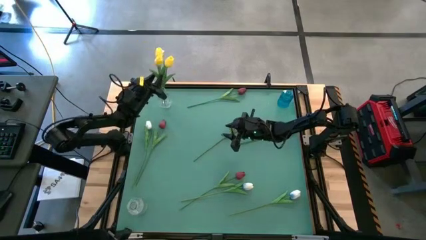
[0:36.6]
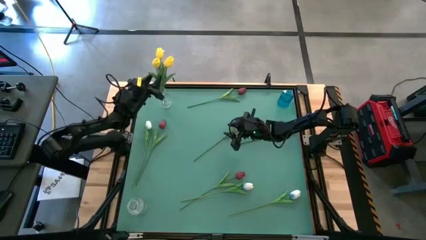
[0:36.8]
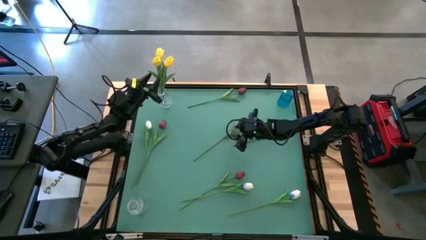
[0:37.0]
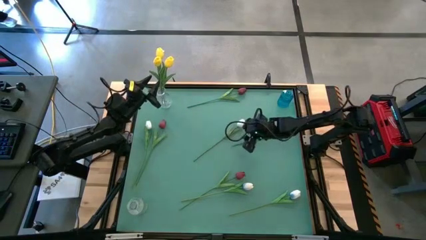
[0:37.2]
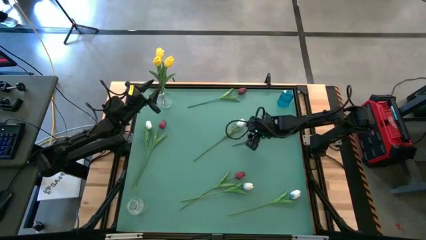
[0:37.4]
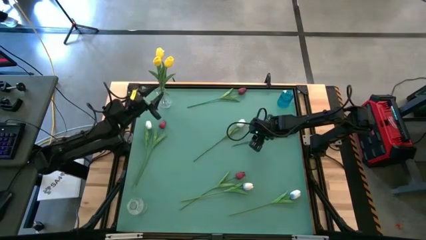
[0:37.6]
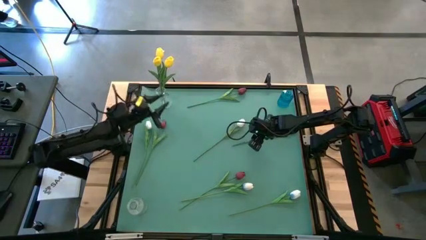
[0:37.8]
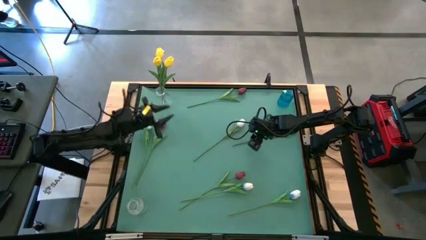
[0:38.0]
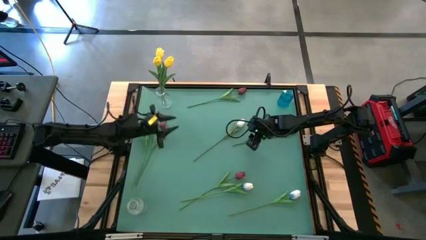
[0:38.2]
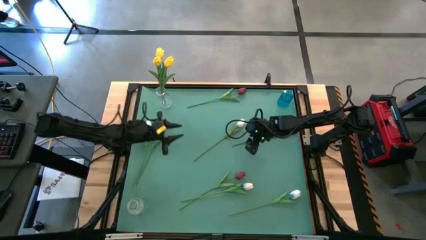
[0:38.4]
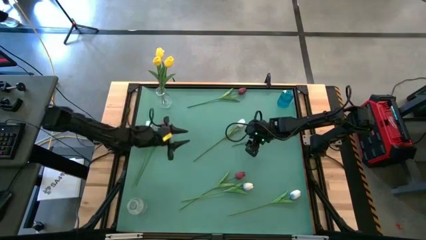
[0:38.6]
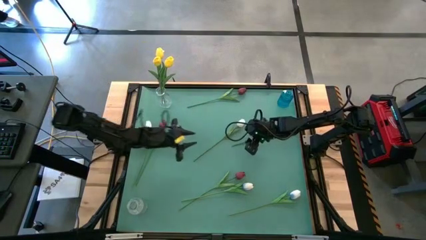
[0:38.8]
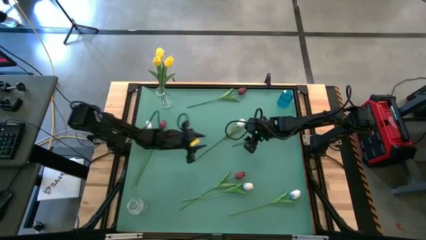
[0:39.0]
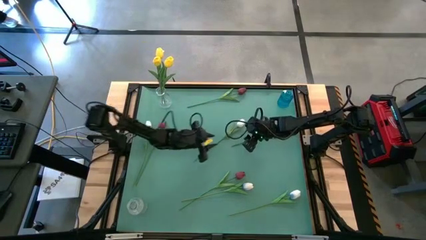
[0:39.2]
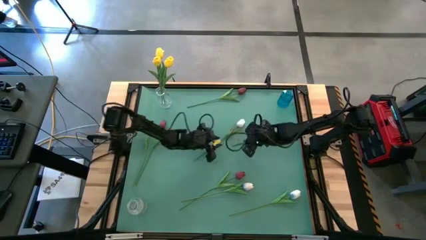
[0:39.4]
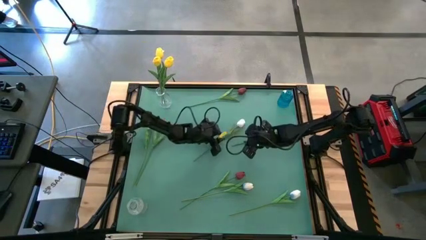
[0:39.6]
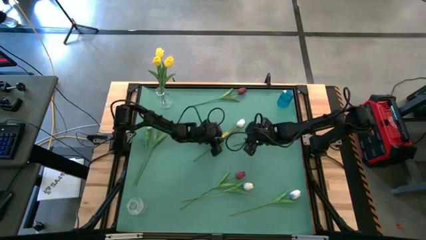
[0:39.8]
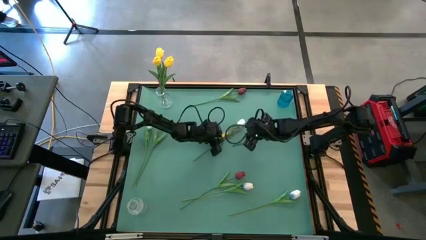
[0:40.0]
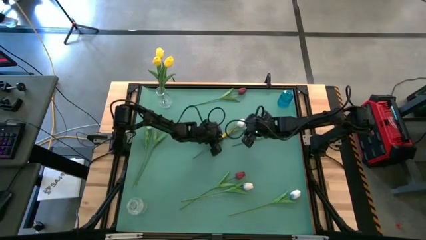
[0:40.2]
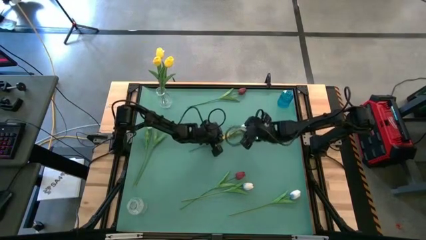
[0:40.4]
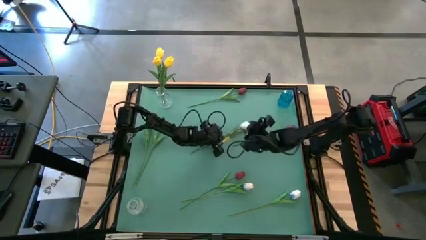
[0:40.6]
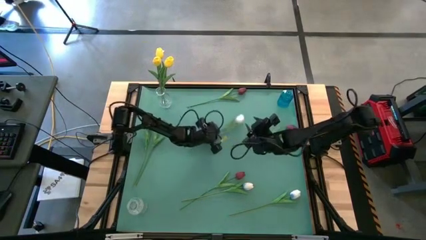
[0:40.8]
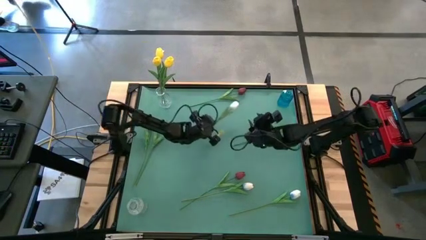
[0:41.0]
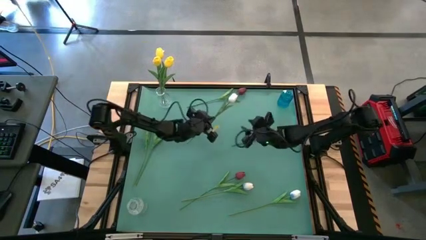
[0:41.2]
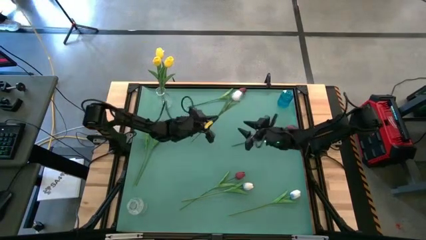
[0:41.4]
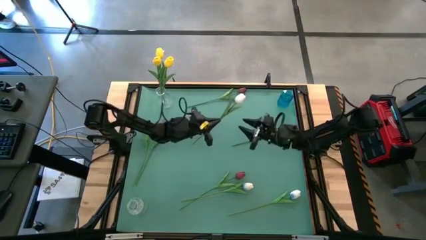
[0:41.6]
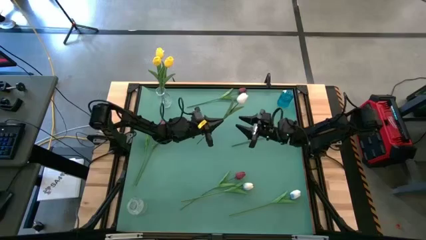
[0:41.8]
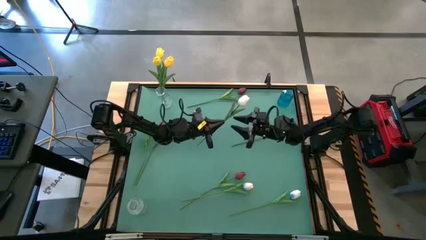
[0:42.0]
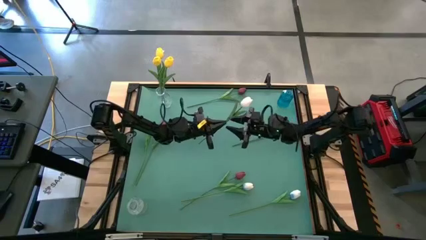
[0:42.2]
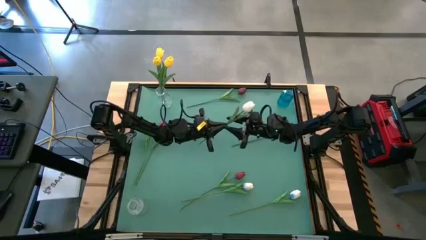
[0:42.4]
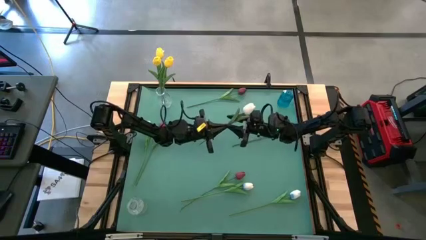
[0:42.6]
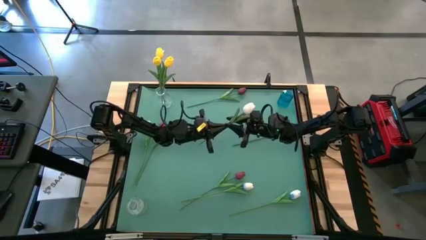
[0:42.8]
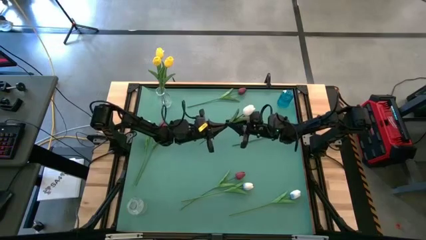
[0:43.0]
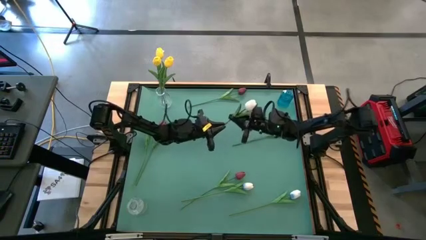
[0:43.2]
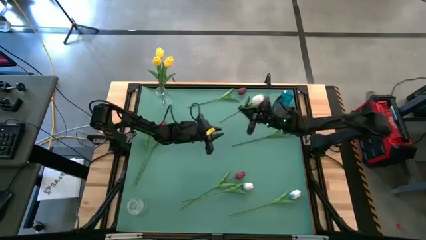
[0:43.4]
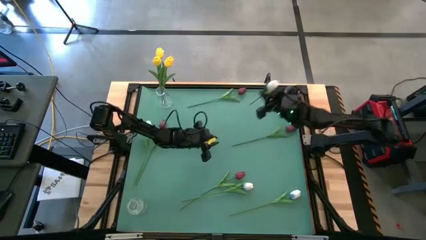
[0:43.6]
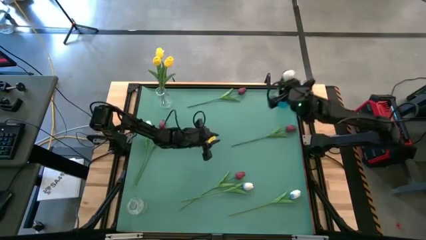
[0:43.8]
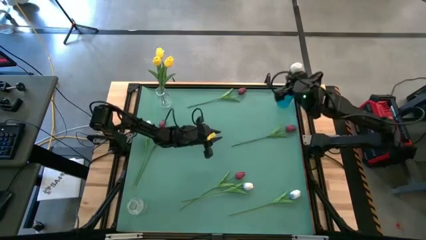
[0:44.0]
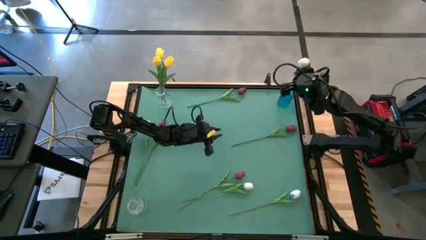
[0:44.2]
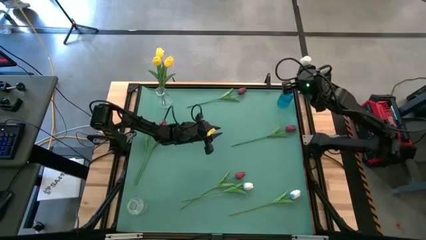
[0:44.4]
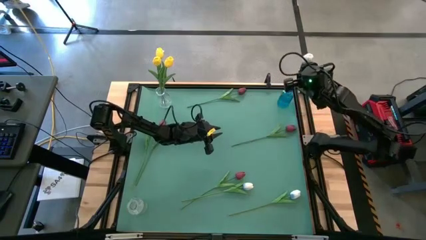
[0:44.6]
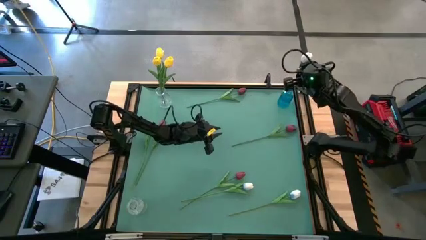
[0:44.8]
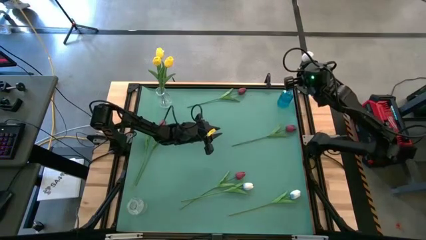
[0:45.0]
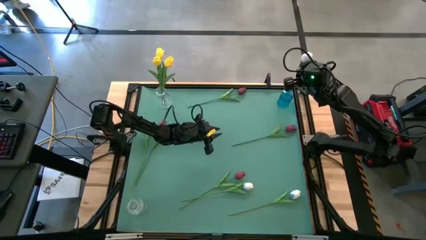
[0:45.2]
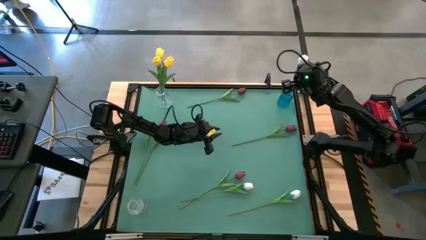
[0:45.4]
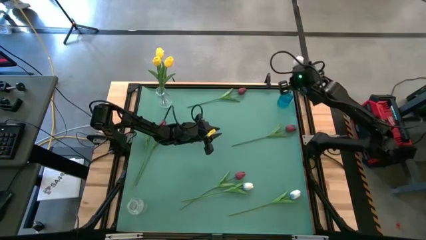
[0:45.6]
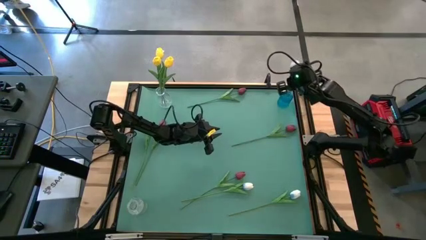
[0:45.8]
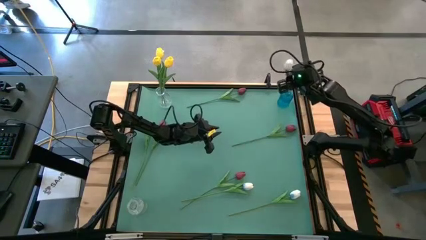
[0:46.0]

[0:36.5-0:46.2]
Task: Sort flowers into vase by color
Put the top right white flower into the blue vase

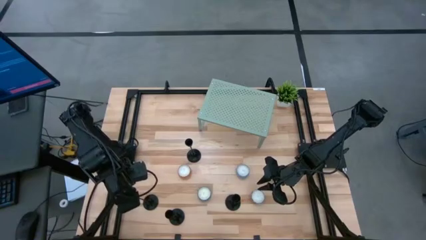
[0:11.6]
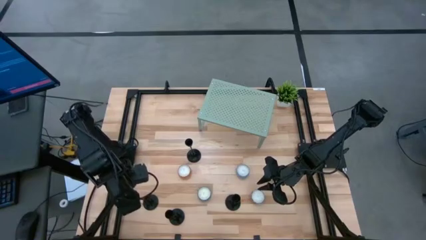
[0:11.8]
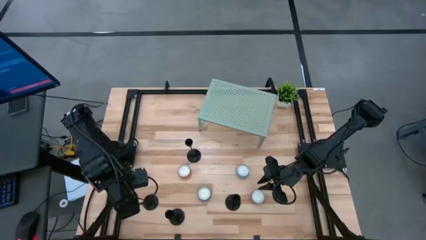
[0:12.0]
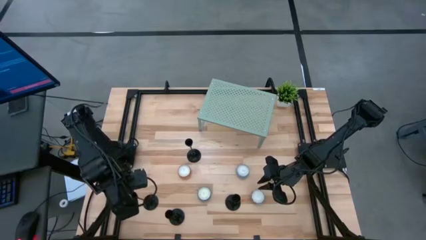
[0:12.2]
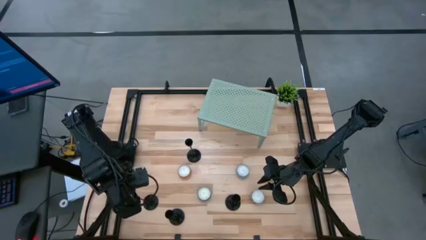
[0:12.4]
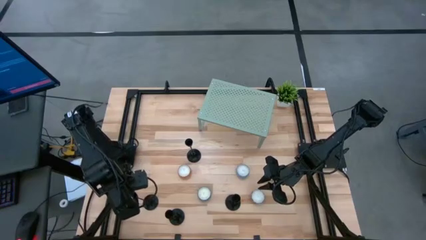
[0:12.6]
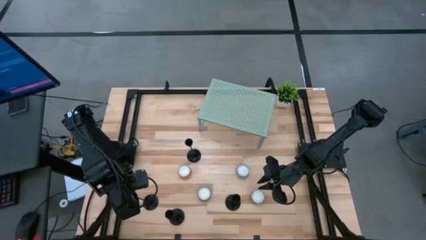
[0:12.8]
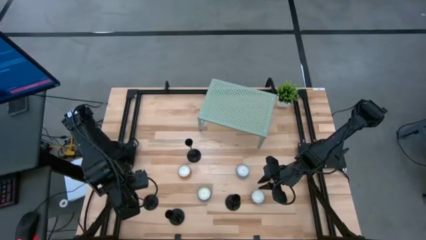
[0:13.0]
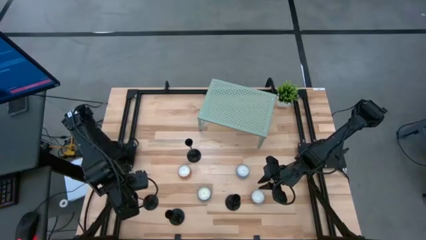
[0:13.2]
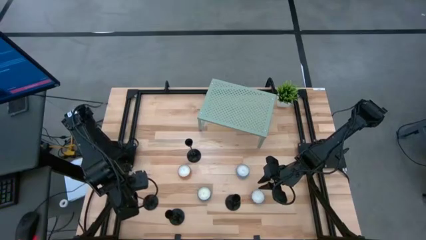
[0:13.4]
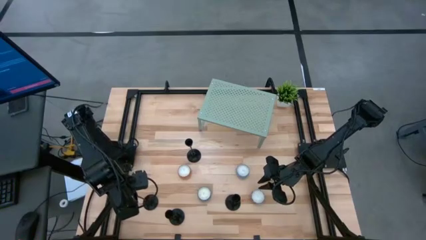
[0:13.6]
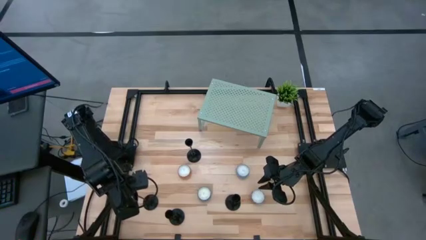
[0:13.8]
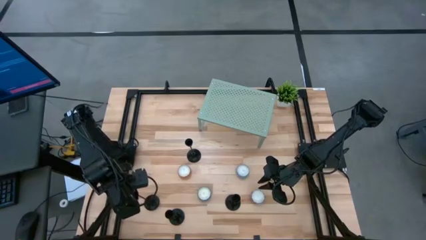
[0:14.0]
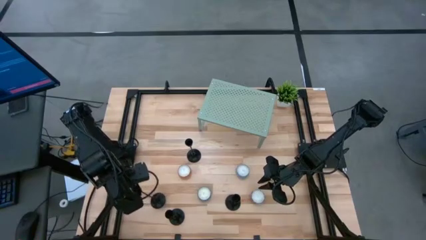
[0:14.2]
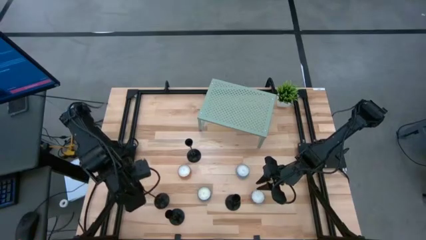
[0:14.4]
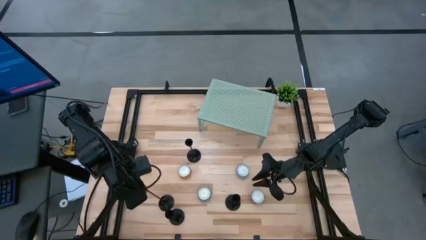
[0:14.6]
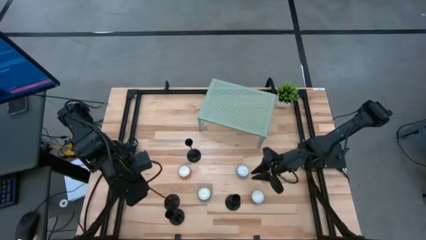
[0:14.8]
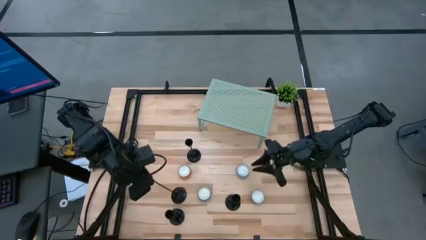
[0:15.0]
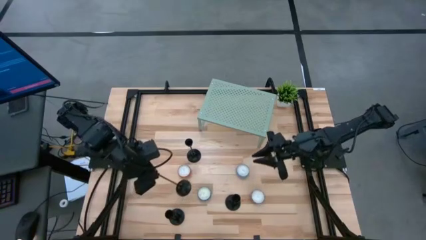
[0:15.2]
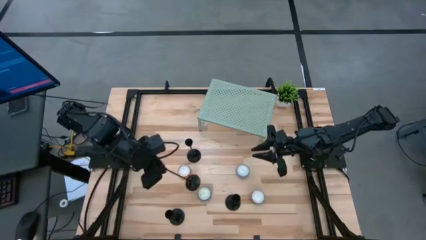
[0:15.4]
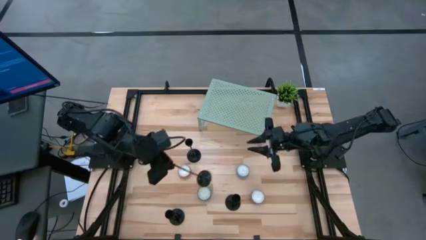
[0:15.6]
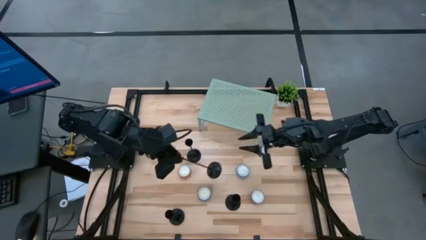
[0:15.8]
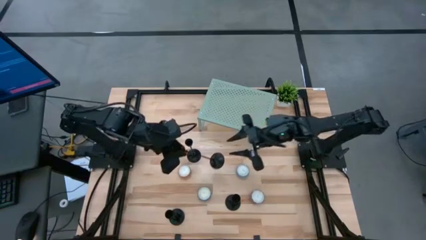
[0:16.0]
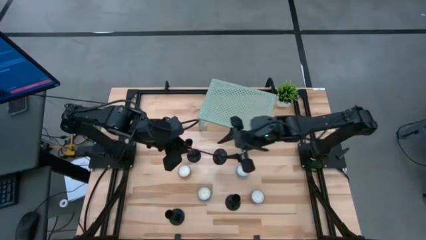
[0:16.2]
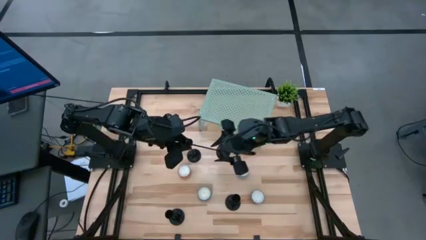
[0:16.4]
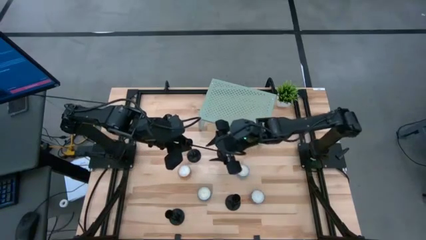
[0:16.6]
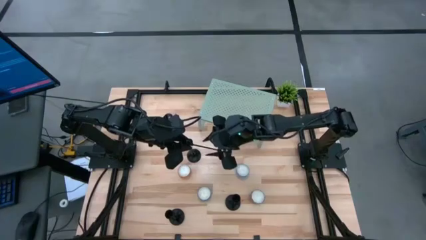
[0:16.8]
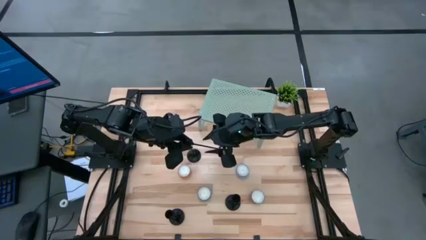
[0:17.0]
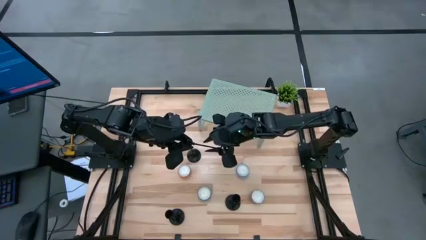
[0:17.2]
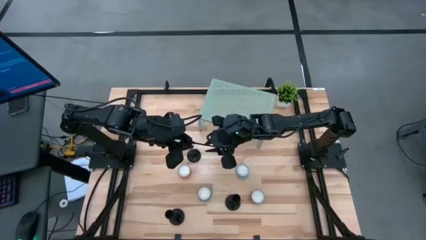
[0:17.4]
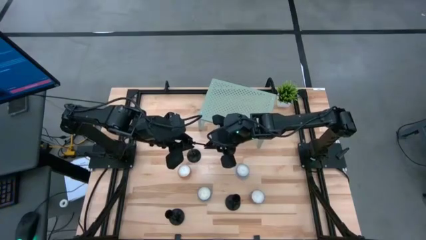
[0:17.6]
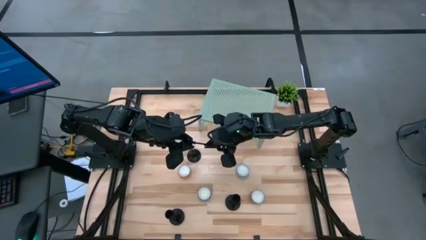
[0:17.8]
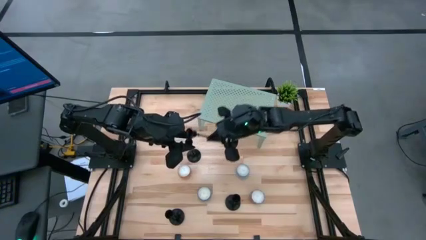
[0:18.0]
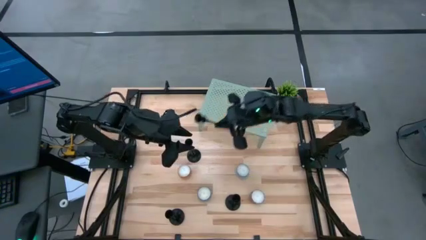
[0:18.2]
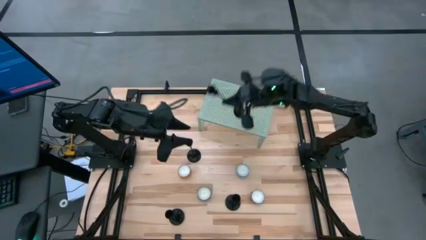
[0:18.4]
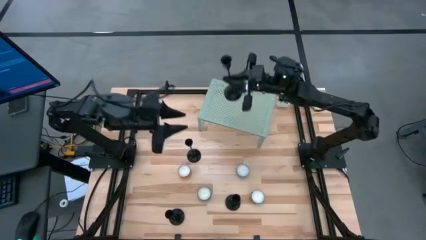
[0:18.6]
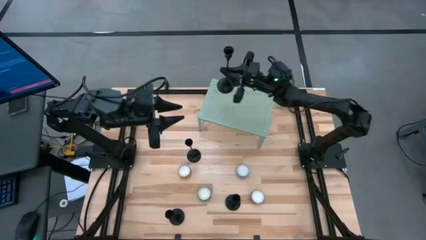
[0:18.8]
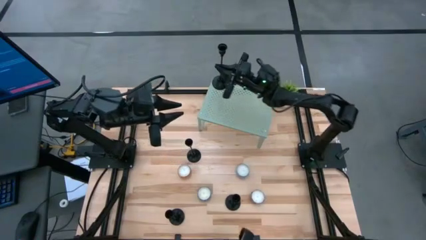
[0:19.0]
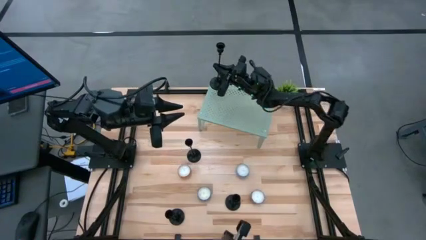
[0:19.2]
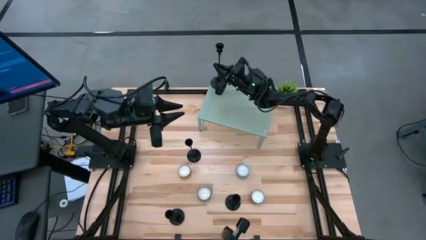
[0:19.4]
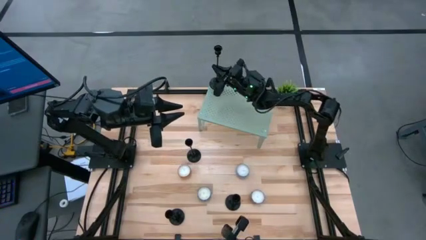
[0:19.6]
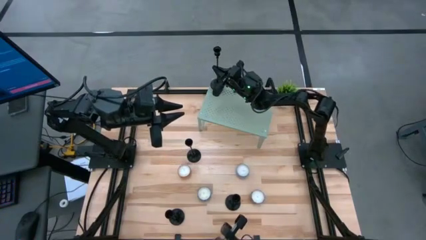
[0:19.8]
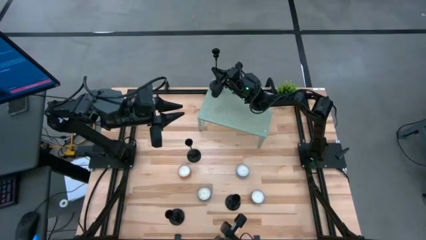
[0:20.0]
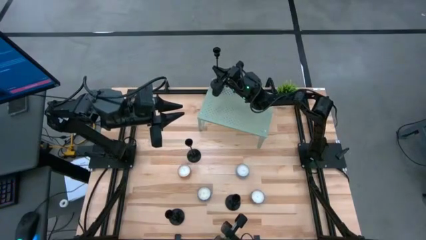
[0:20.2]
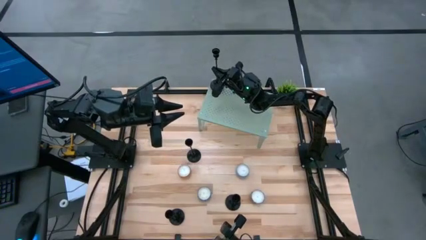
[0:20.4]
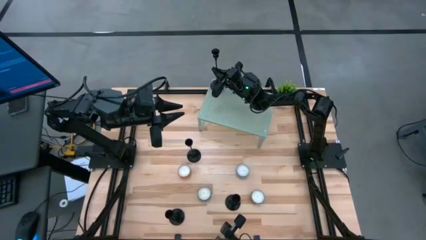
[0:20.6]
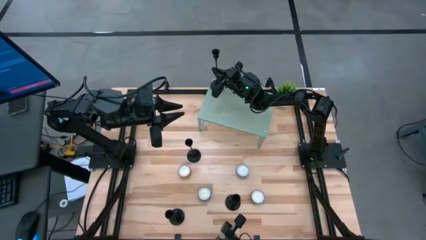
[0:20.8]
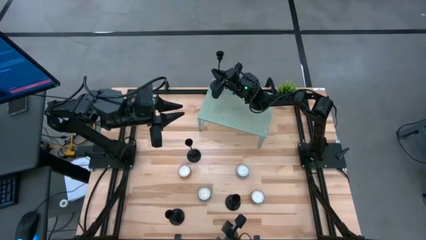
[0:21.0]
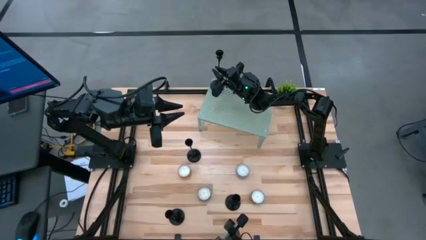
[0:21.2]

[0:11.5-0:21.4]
Task: Pick & Place candle stick holders
Put the black candle holder on the shelf
